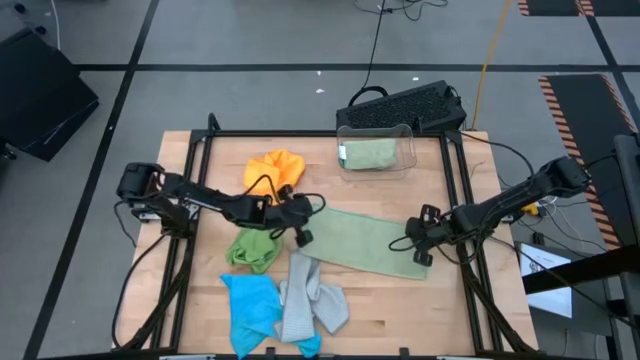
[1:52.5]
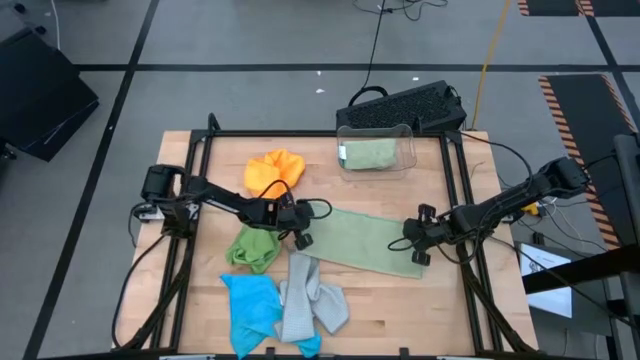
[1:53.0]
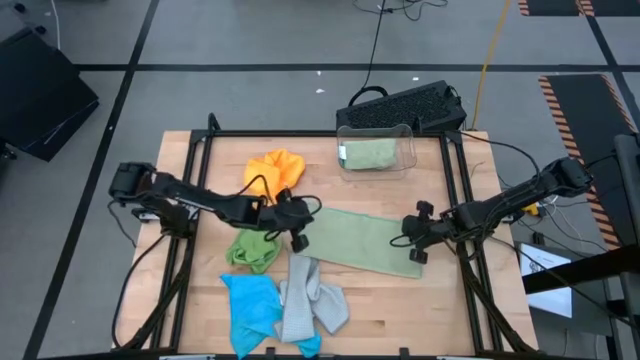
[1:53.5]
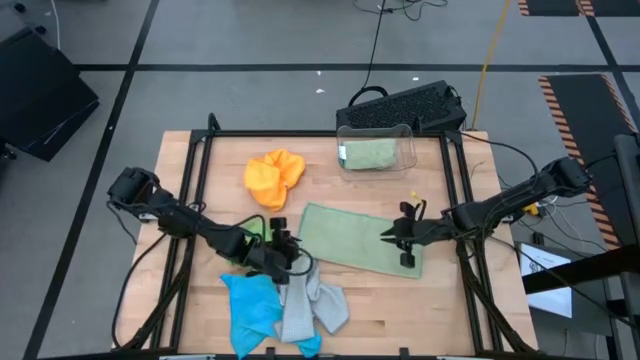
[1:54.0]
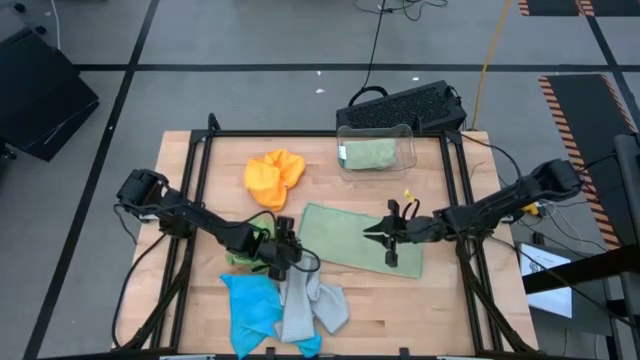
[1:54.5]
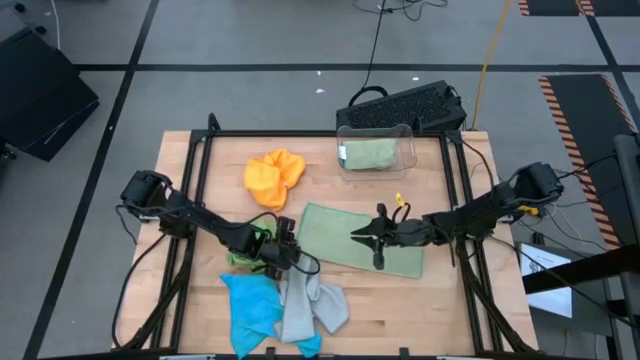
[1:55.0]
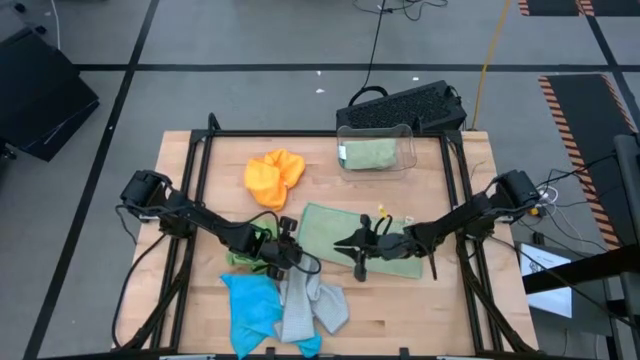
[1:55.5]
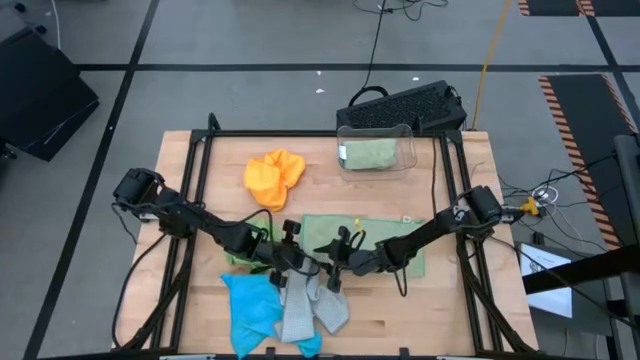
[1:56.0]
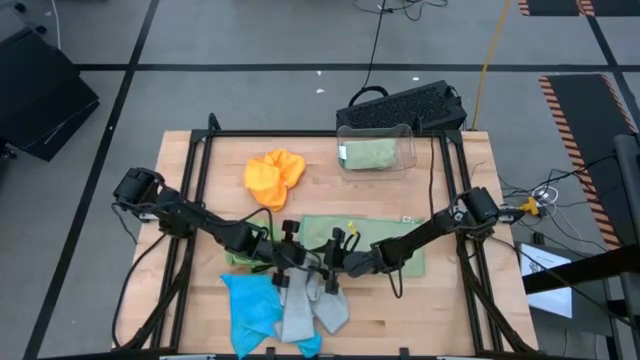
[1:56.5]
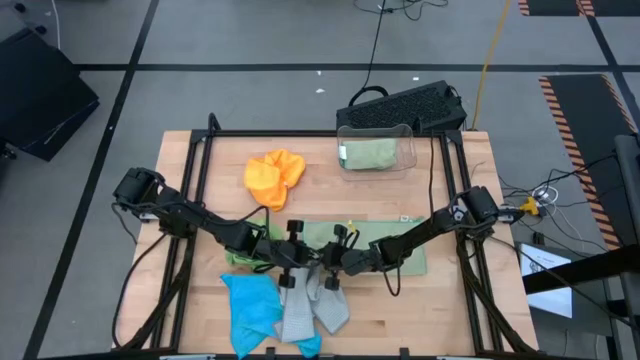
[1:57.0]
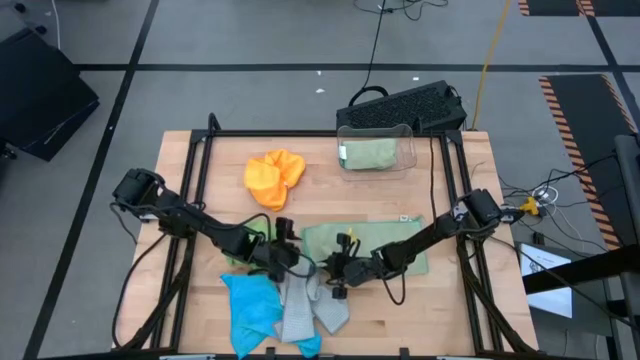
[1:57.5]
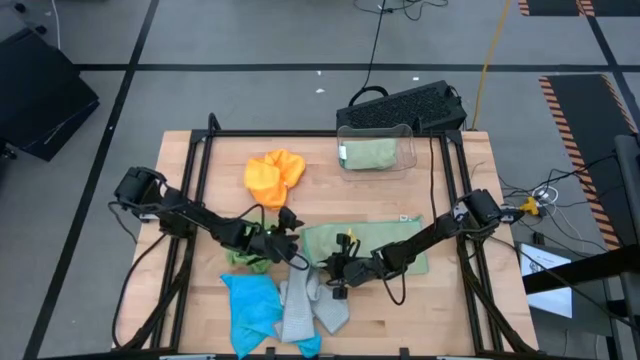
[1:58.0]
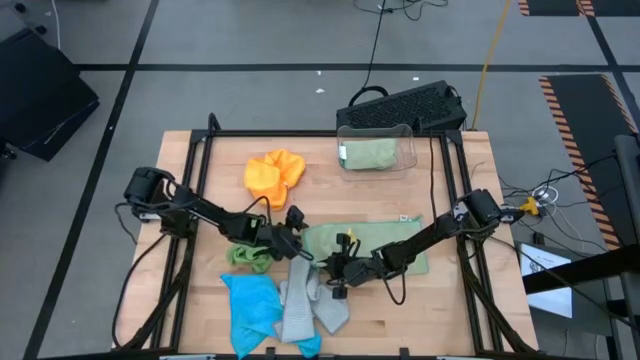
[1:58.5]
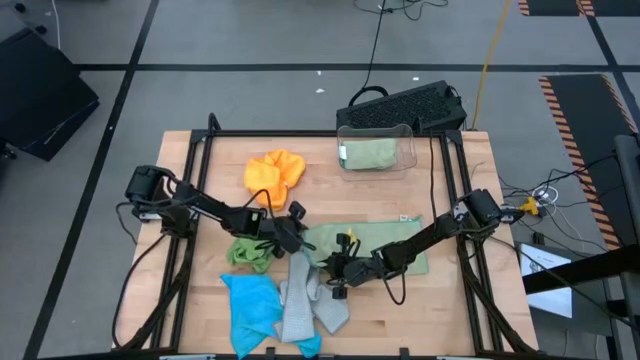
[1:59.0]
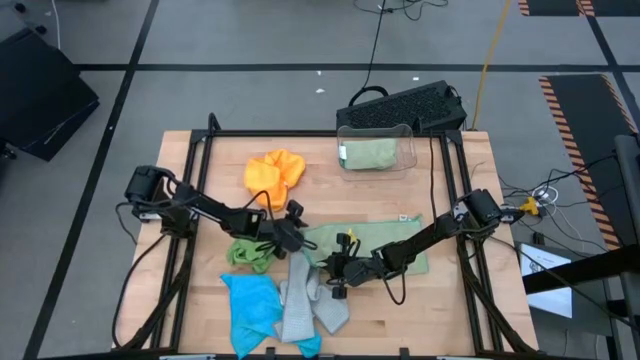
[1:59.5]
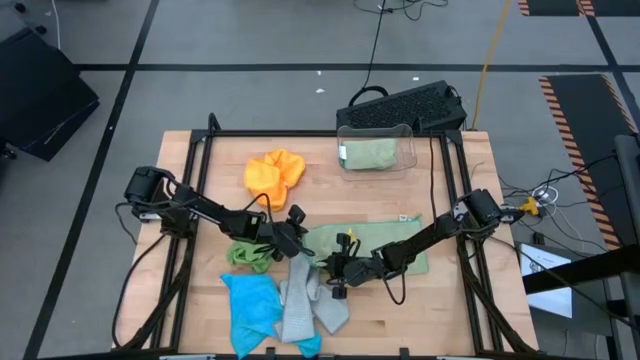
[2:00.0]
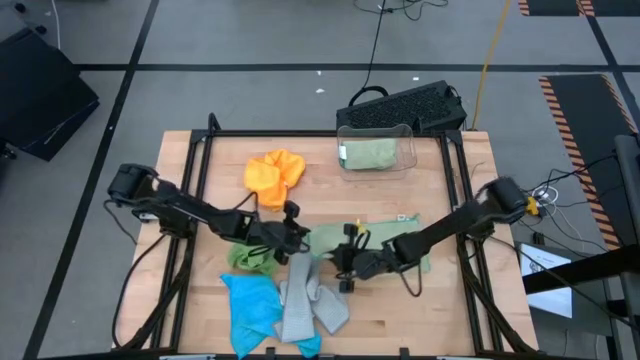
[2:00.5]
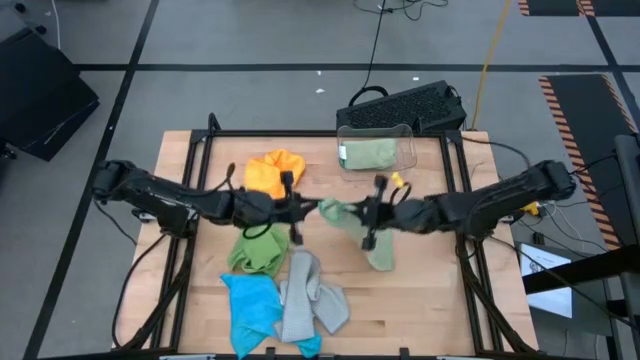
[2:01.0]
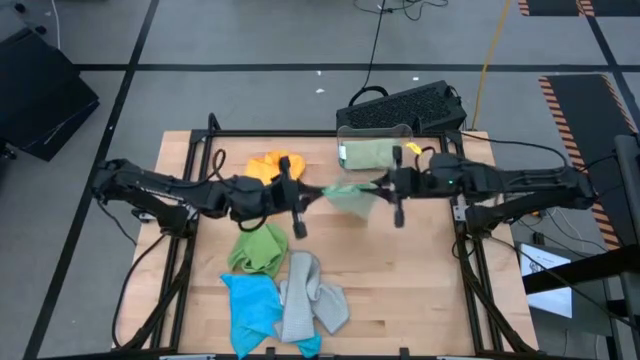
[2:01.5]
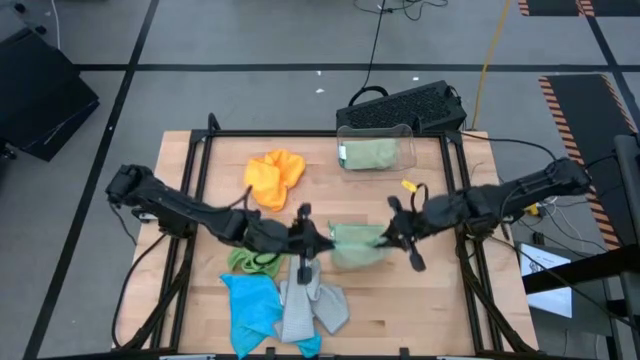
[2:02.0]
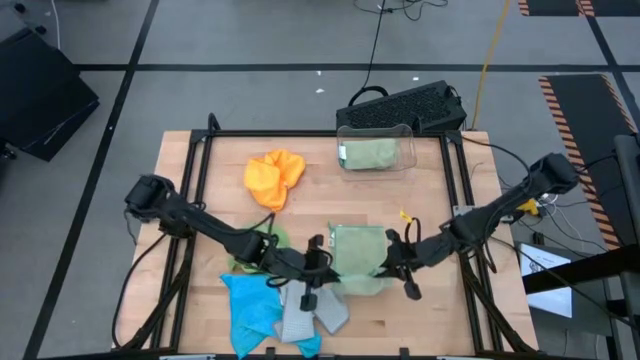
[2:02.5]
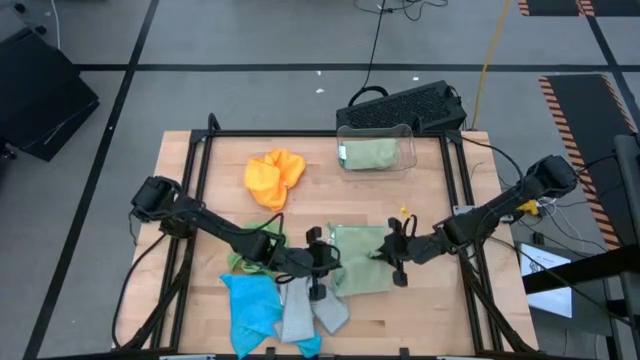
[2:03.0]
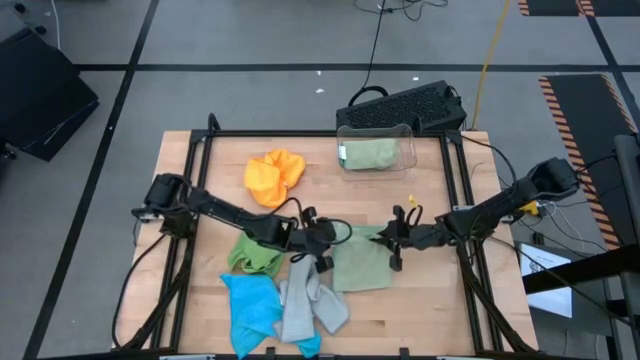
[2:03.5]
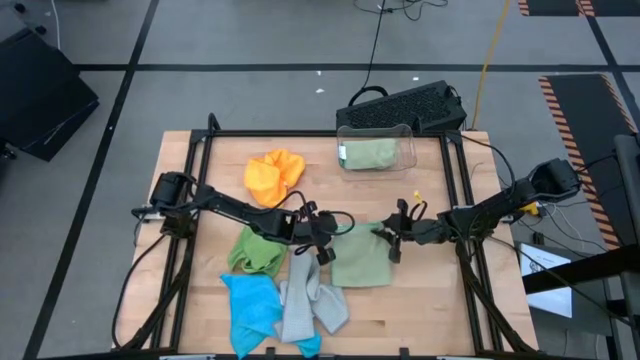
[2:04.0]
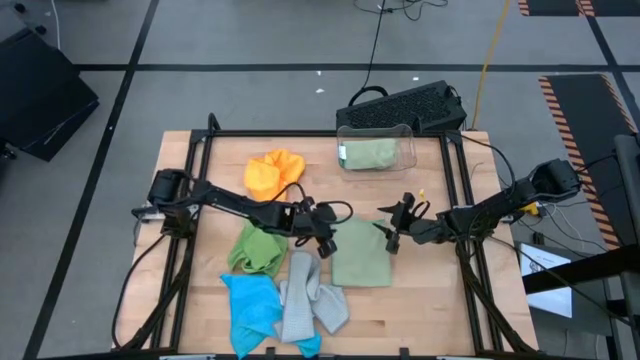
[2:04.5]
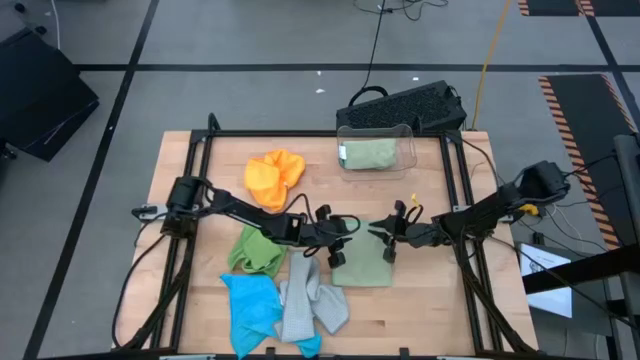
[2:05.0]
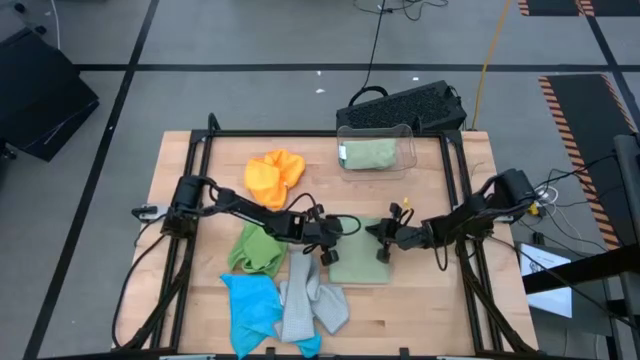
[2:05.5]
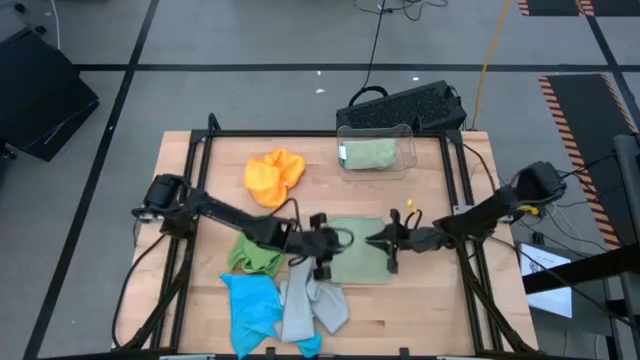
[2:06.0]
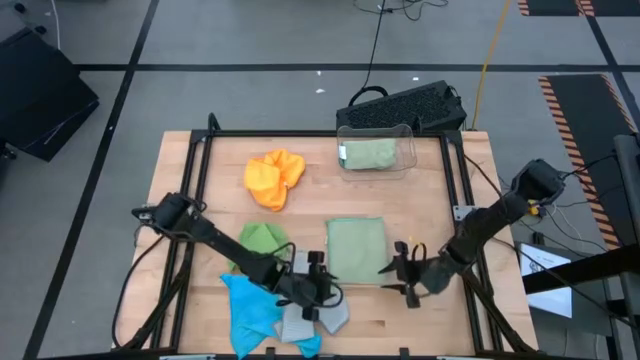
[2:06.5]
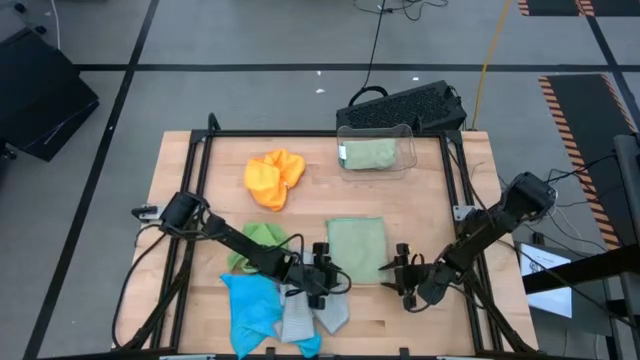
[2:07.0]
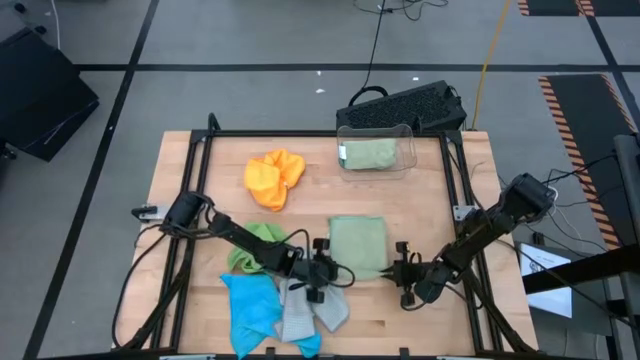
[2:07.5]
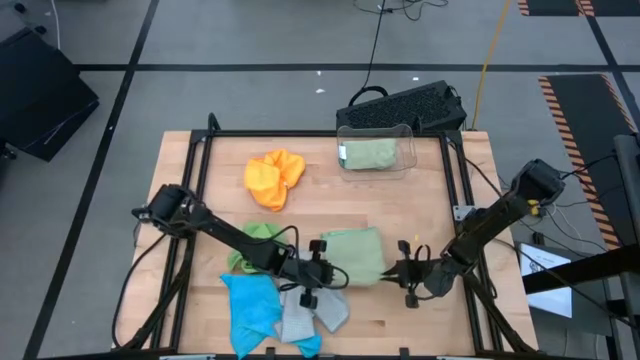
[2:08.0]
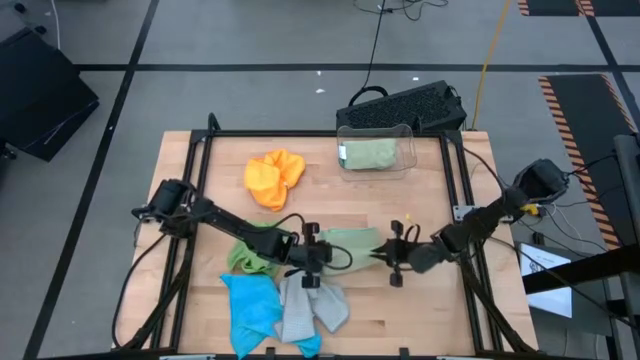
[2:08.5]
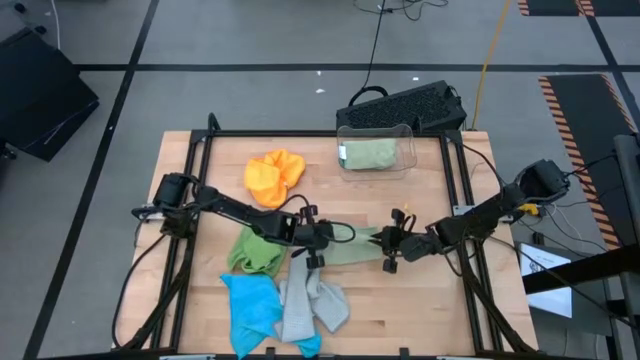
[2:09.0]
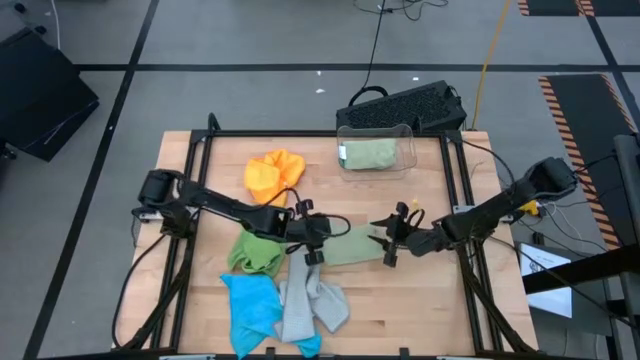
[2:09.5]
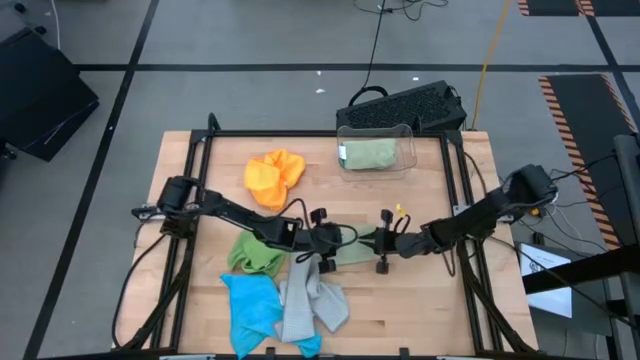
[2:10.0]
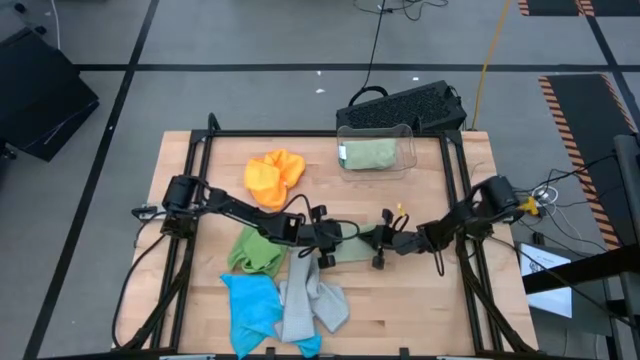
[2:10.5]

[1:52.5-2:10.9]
Task: Fold microfiber towels
Fold the light green microfiber towel
